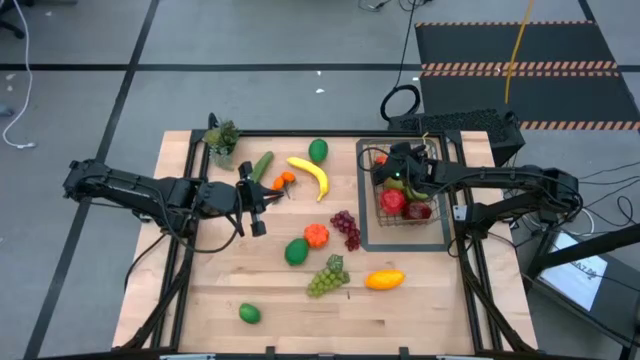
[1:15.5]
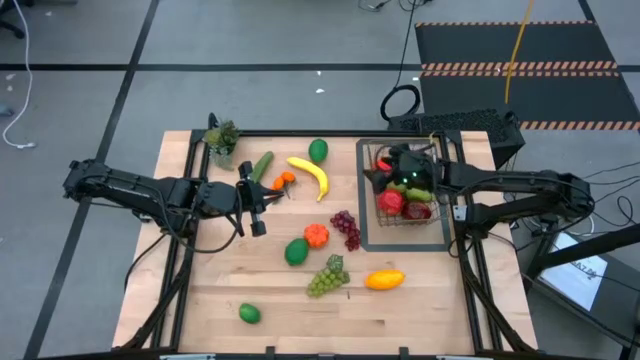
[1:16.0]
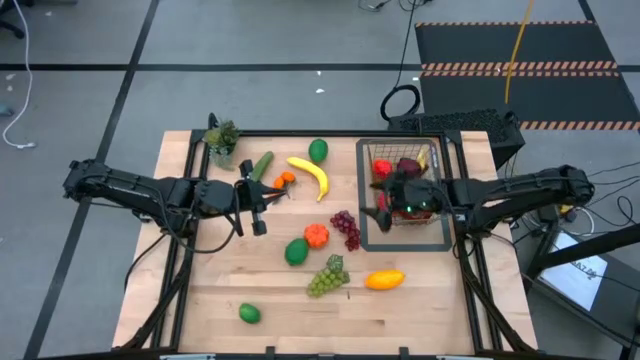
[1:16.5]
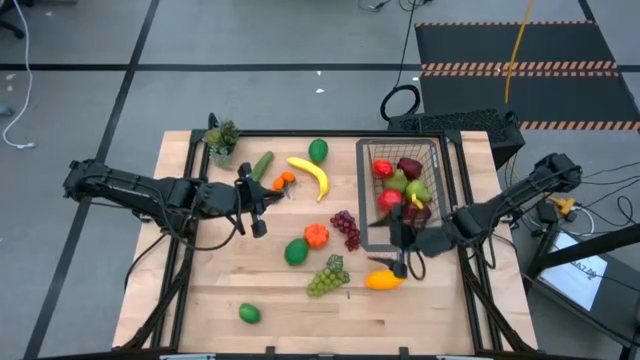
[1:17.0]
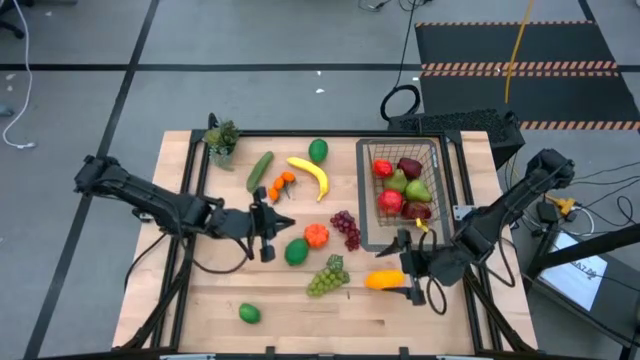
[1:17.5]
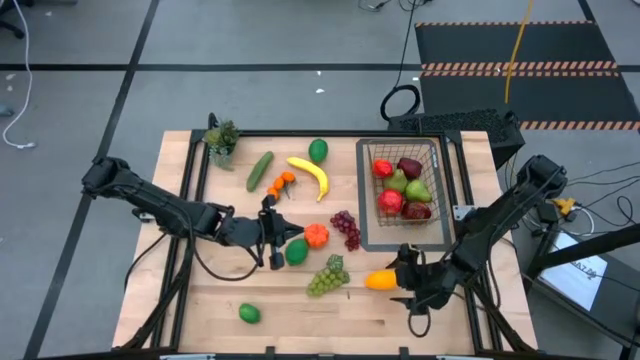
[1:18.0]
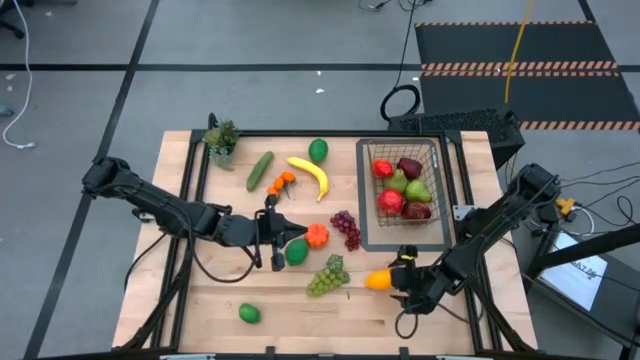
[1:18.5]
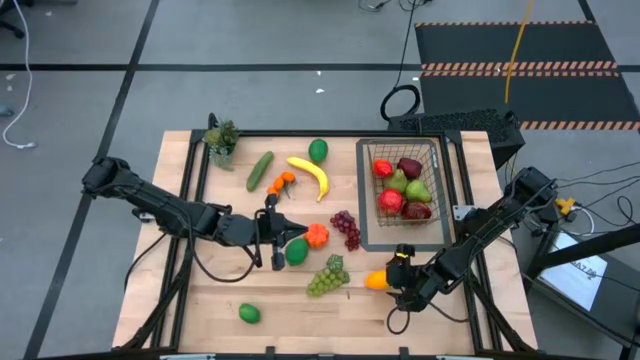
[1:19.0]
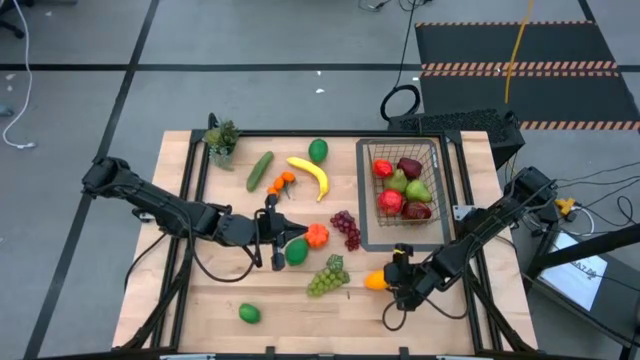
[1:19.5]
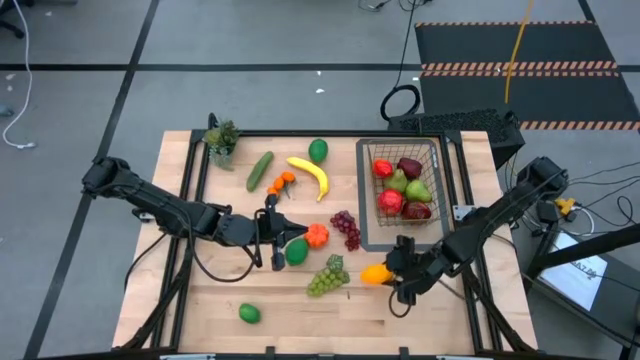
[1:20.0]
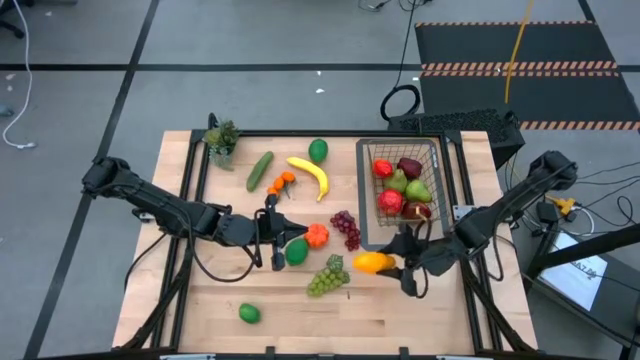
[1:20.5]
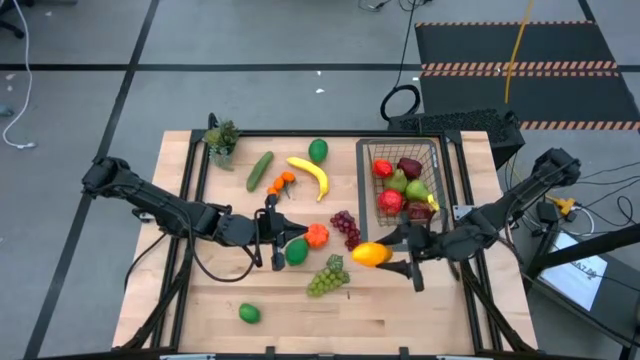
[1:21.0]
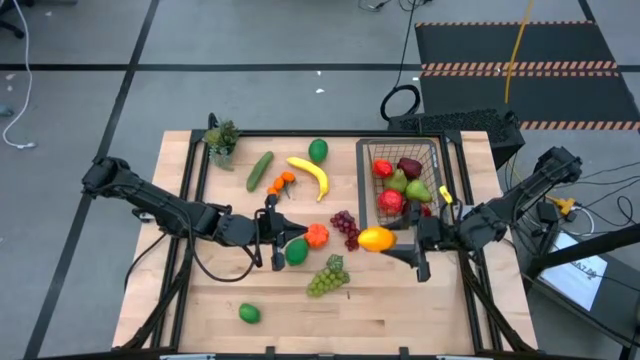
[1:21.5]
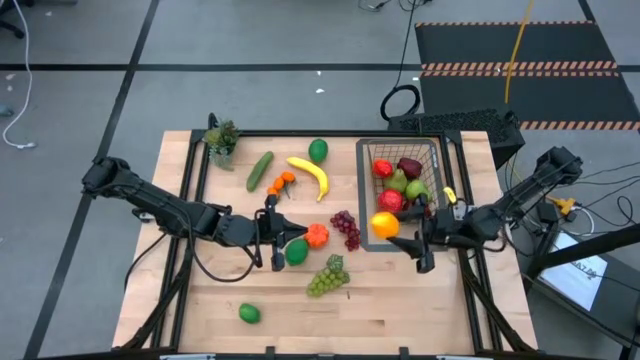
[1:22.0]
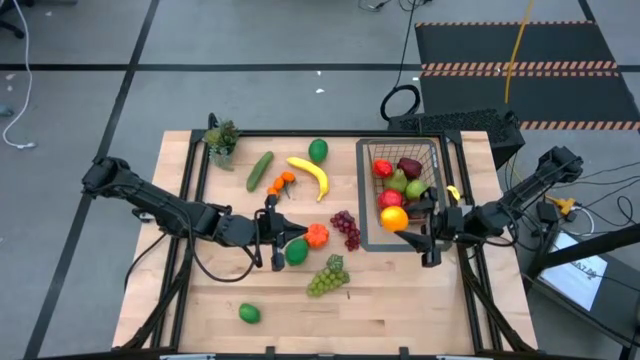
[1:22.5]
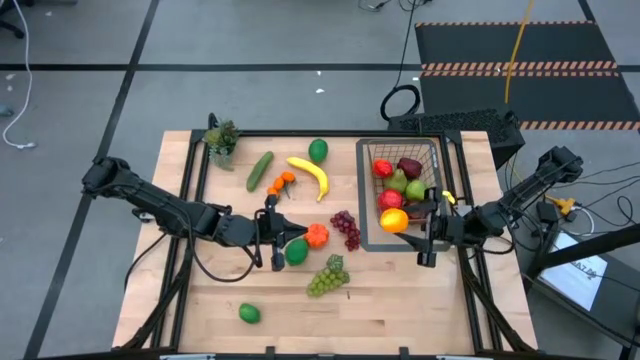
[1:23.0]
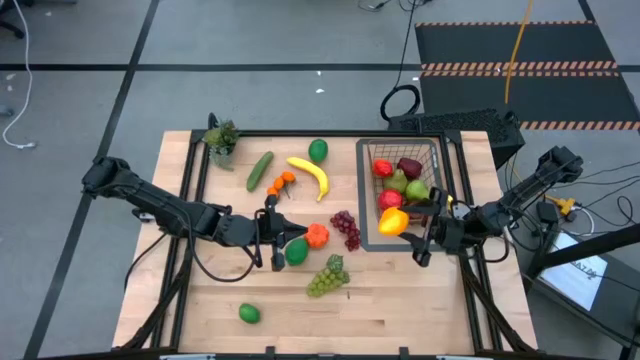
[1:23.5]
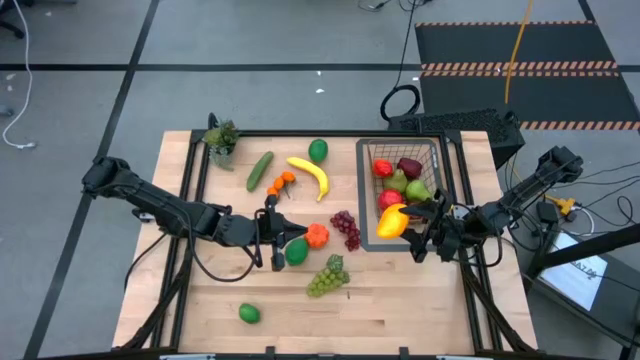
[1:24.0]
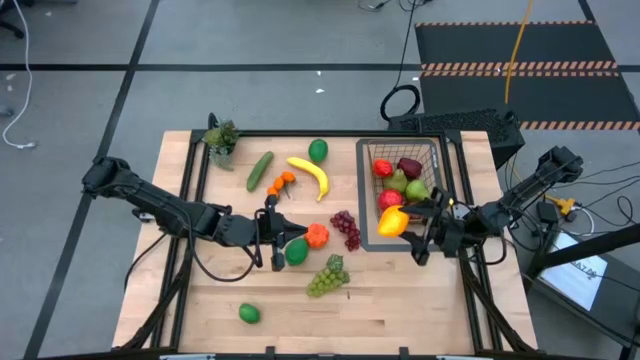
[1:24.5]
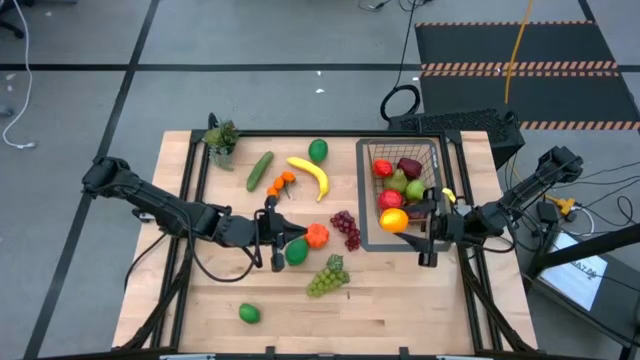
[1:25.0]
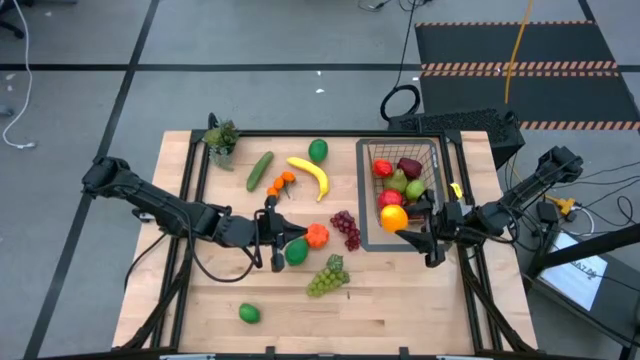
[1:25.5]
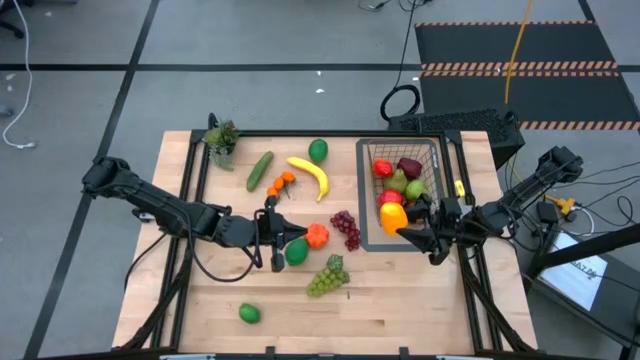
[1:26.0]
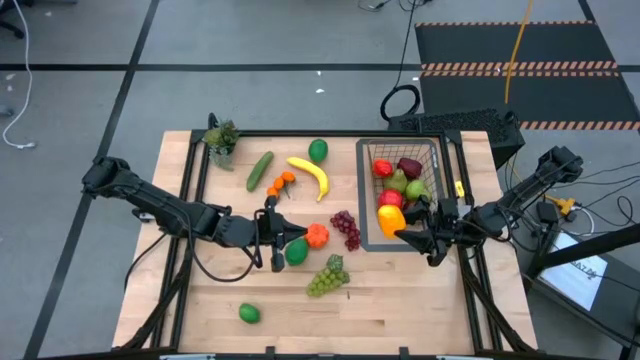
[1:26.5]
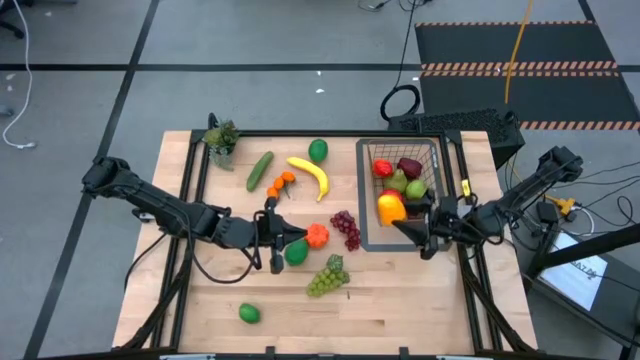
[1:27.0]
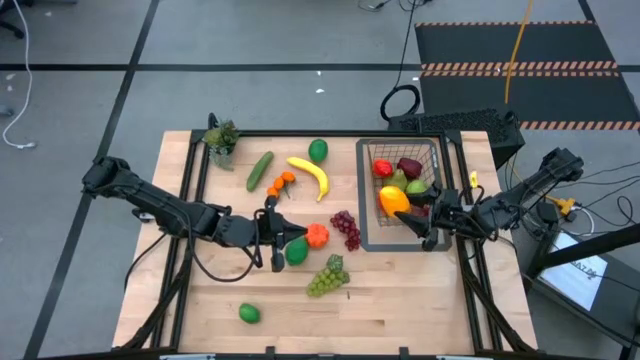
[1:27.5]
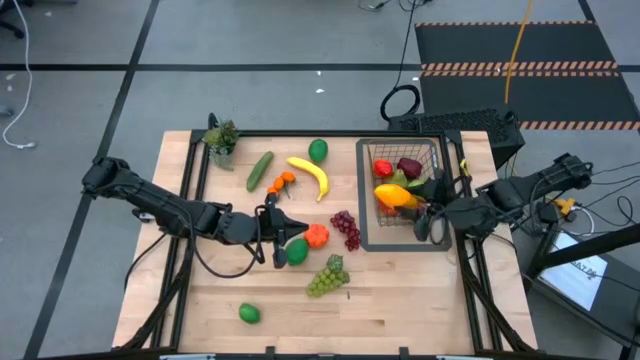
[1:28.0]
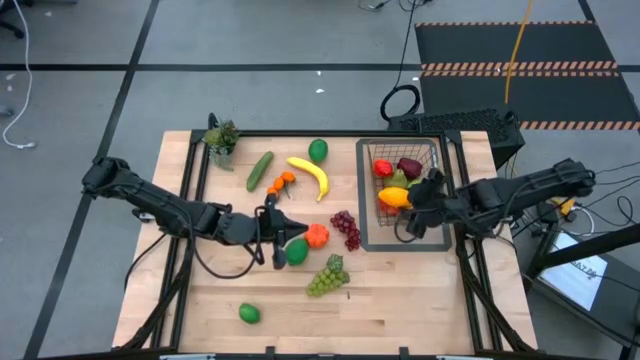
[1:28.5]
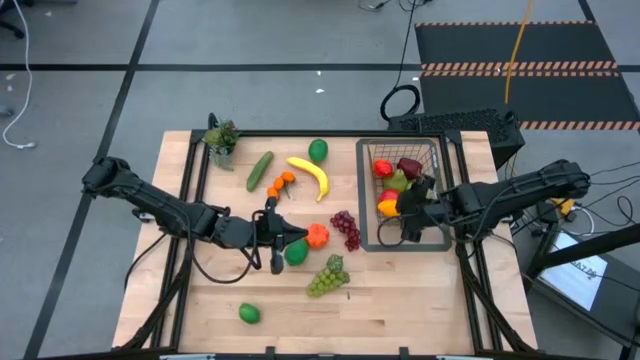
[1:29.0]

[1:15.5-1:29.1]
Task: Build produce basket
Put the mango into the gold wire basket

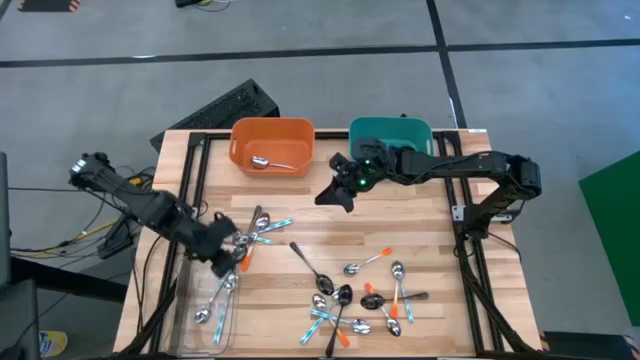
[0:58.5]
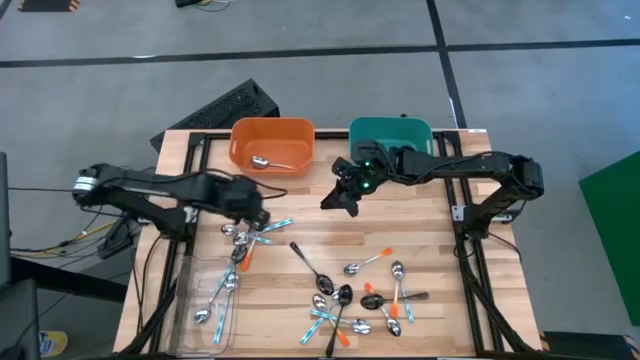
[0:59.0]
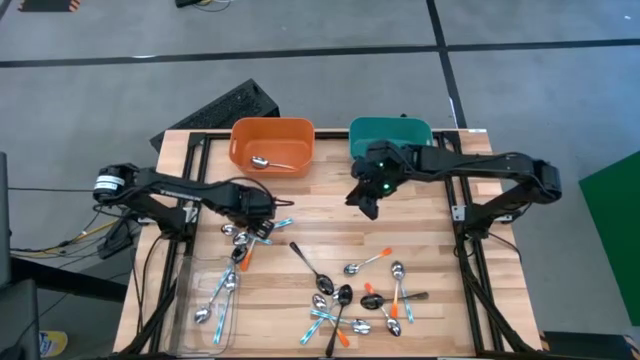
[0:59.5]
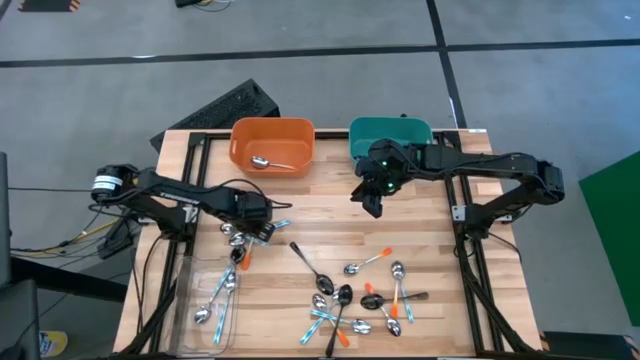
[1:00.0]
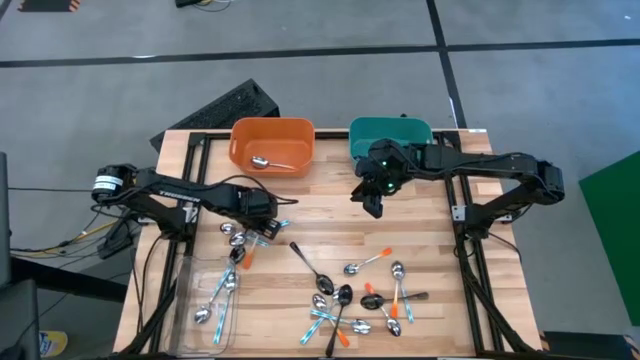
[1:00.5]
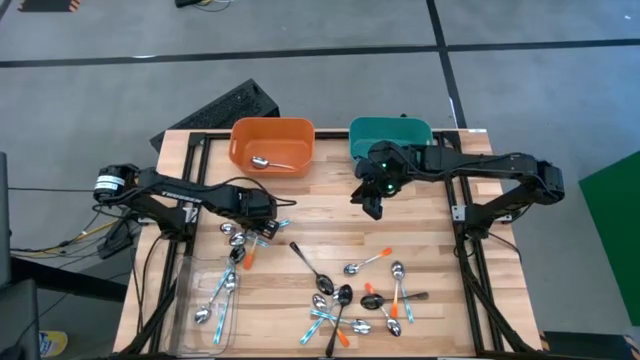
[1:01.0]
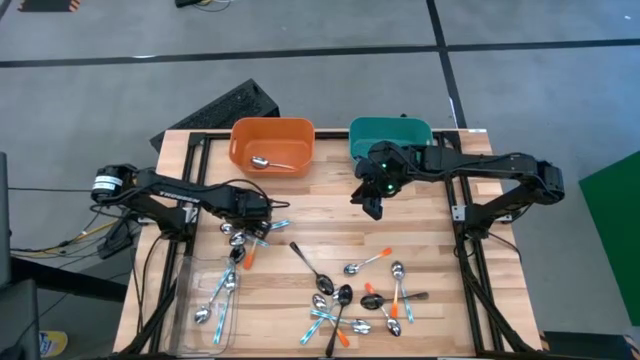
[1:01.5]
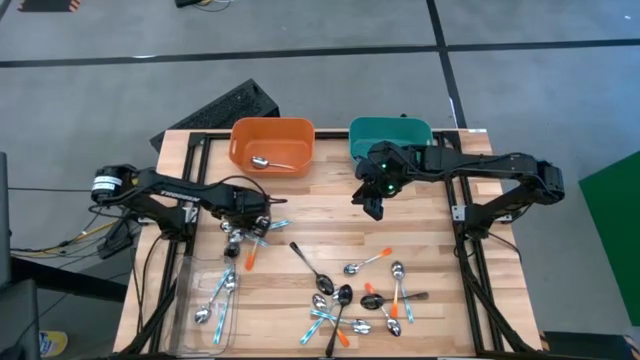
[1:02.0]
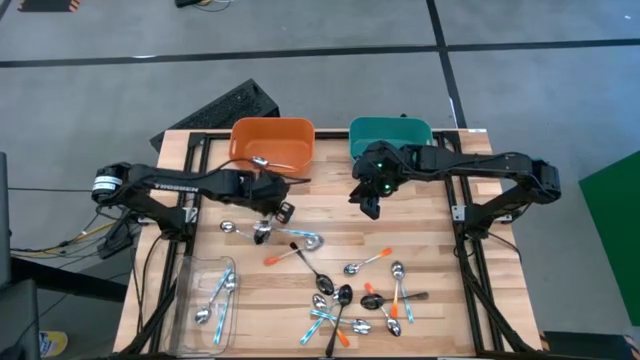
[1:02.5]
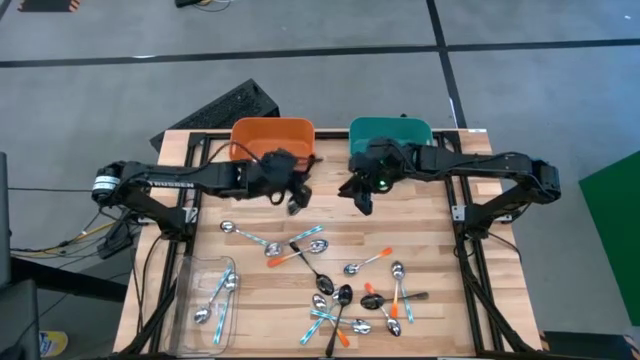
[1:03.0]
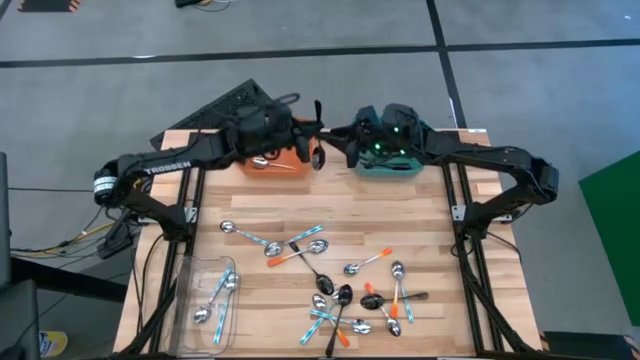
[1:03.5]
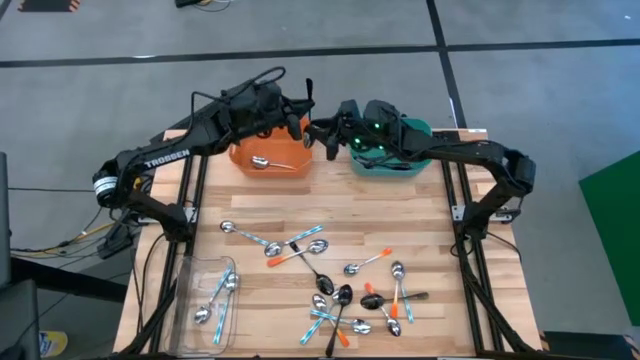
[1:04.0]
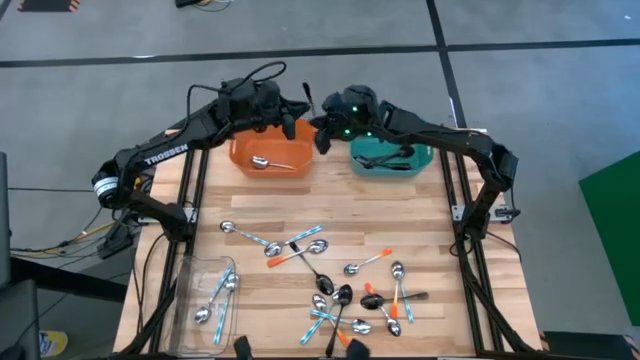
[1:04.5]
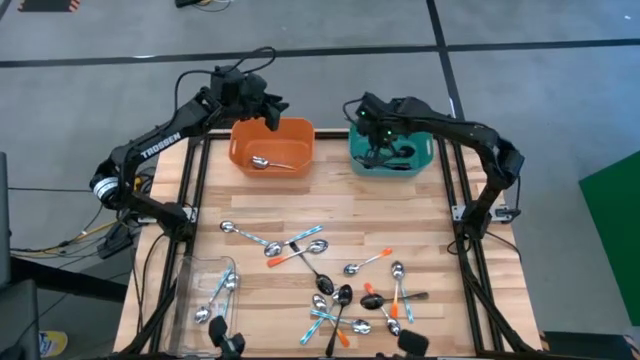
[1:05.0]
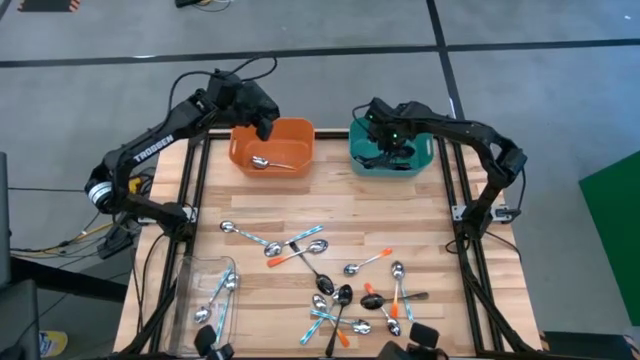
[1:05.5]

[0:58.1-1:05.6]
Task: Sort silverware by color (type)
Put the black spoon into the blue bin
